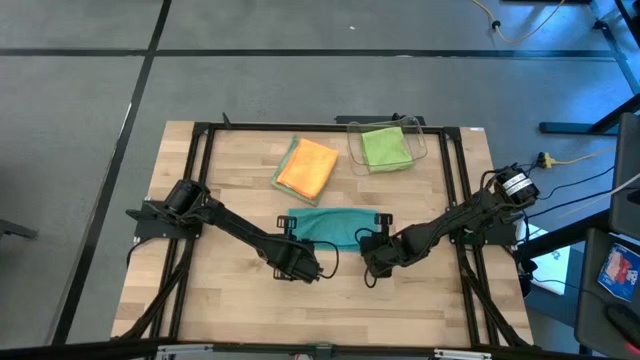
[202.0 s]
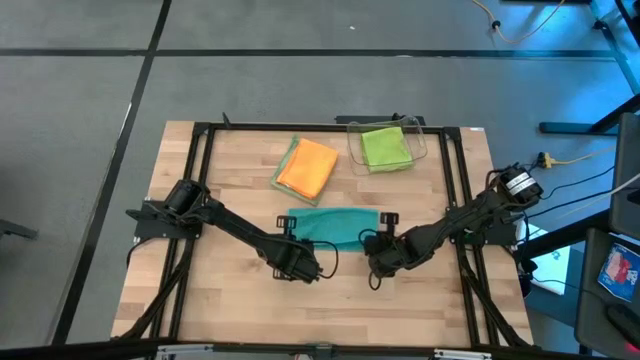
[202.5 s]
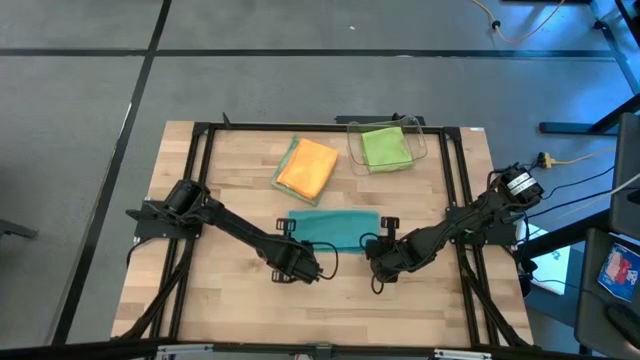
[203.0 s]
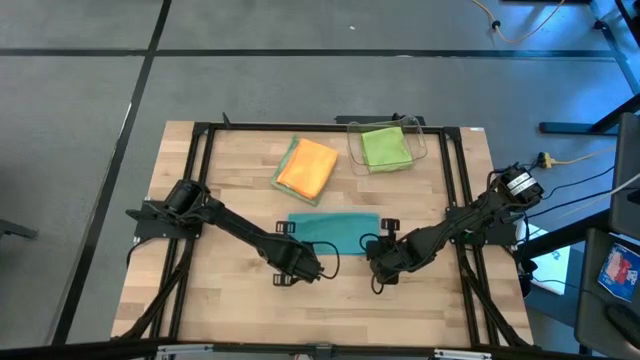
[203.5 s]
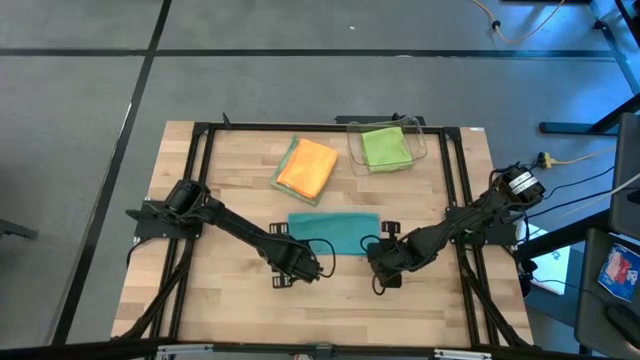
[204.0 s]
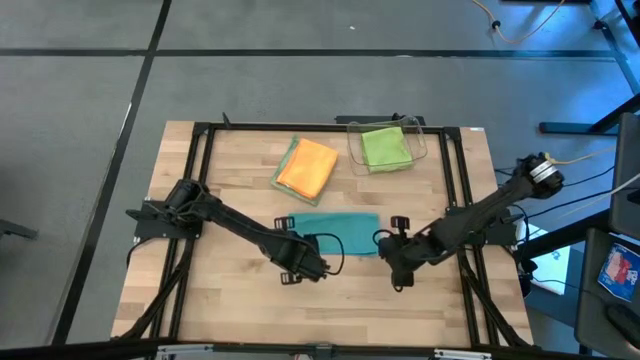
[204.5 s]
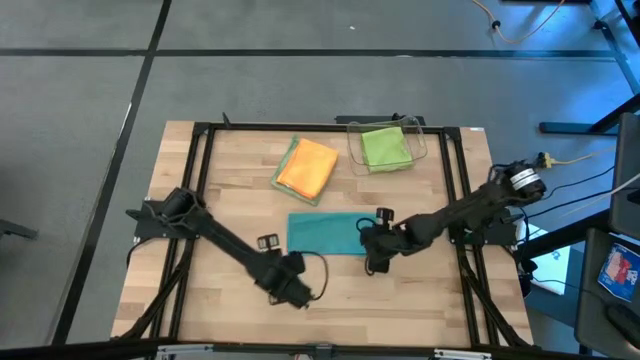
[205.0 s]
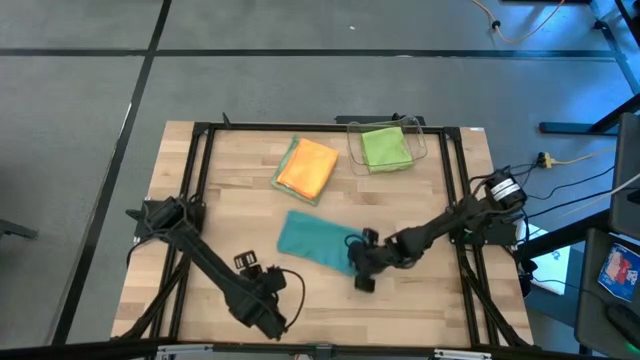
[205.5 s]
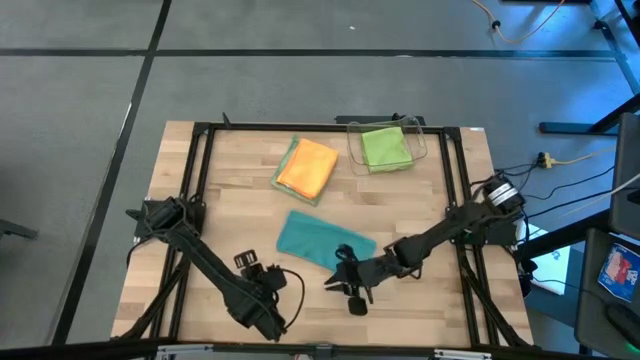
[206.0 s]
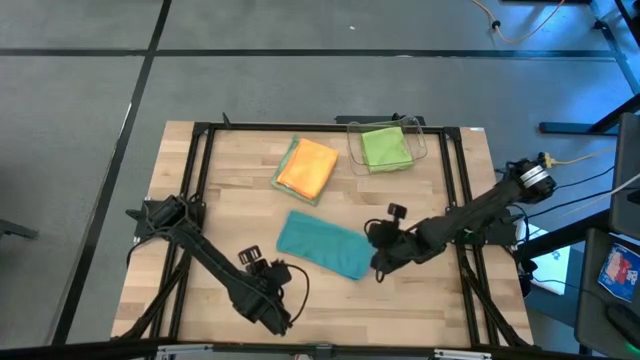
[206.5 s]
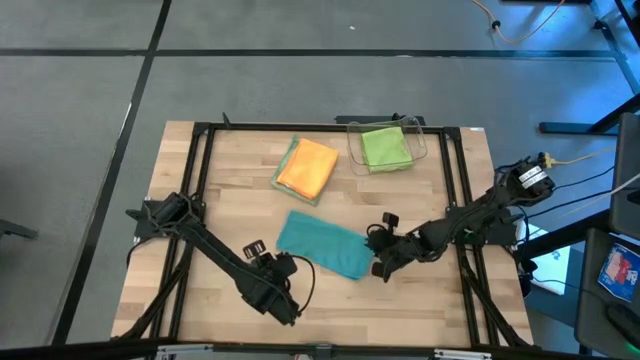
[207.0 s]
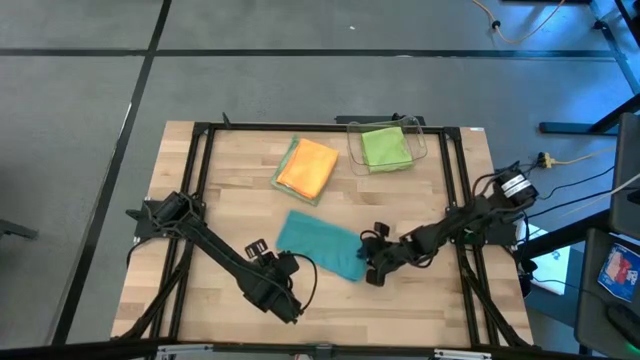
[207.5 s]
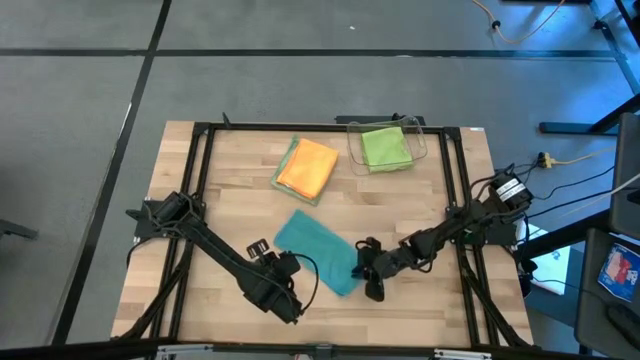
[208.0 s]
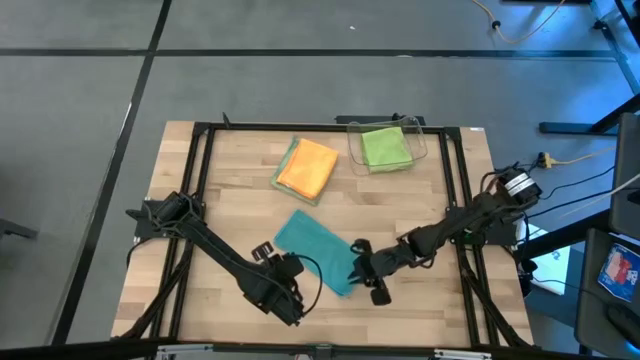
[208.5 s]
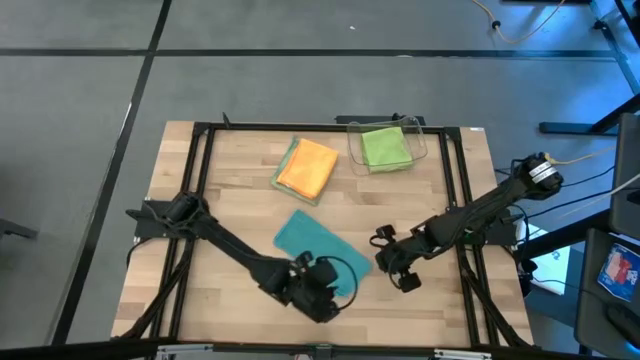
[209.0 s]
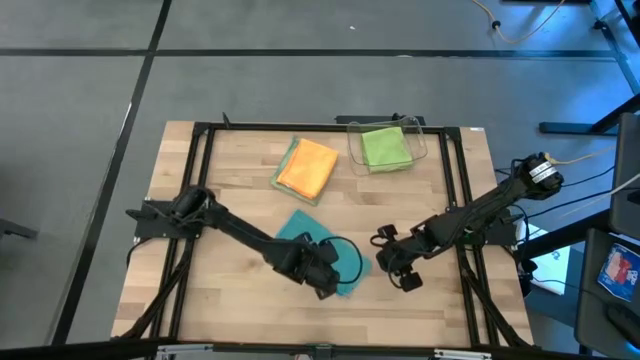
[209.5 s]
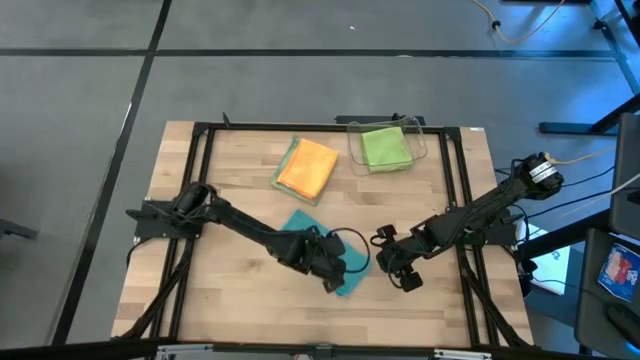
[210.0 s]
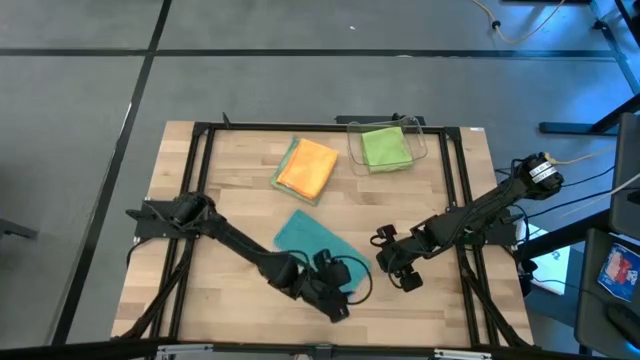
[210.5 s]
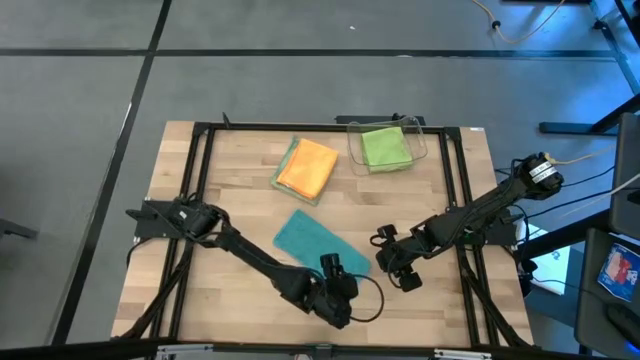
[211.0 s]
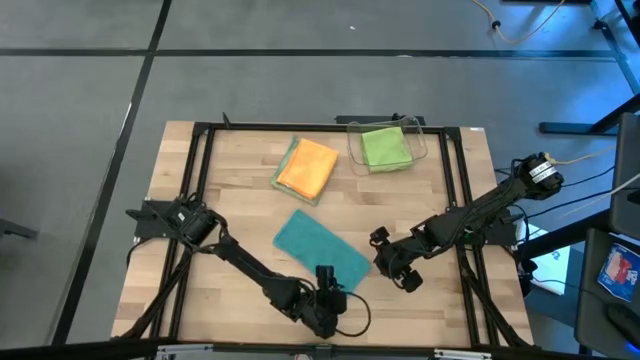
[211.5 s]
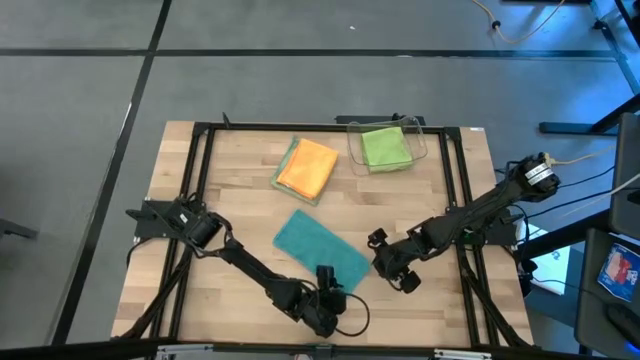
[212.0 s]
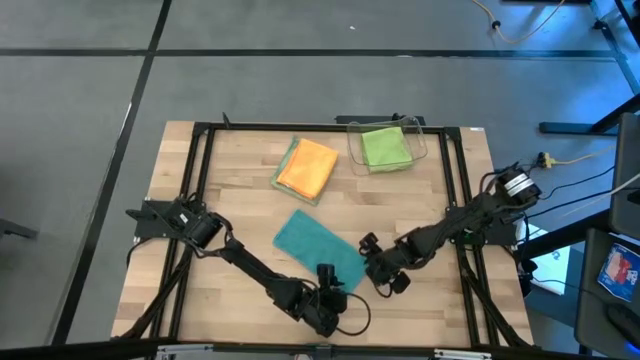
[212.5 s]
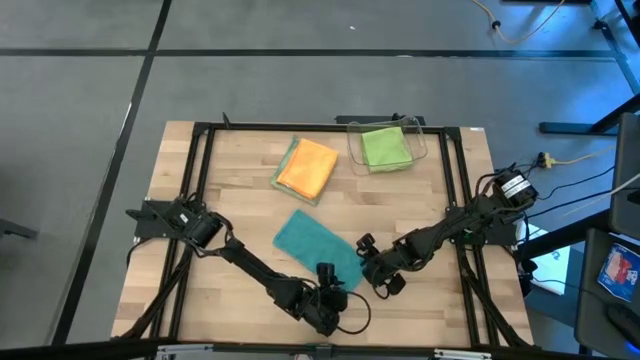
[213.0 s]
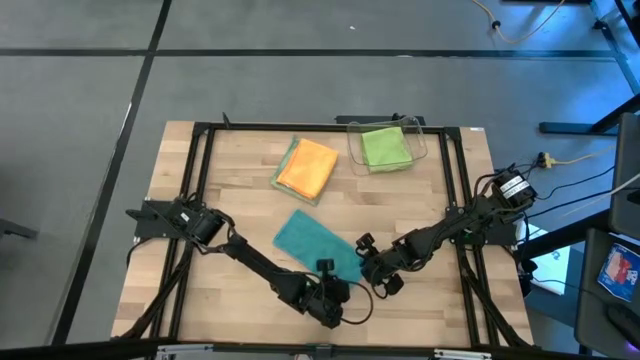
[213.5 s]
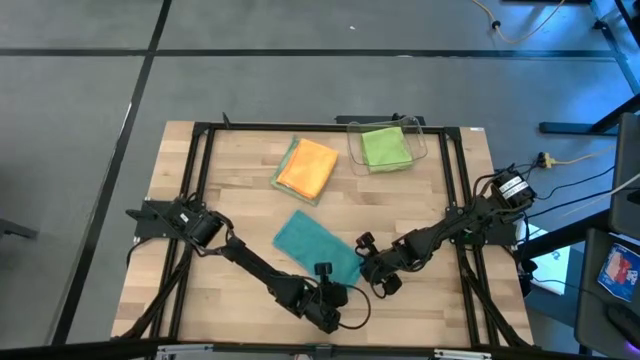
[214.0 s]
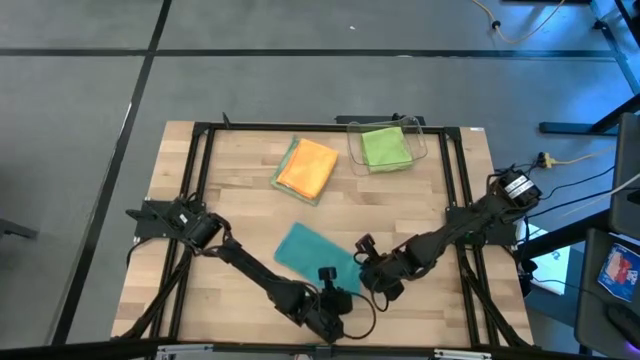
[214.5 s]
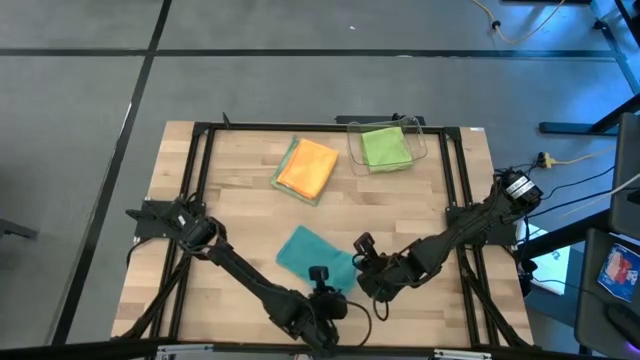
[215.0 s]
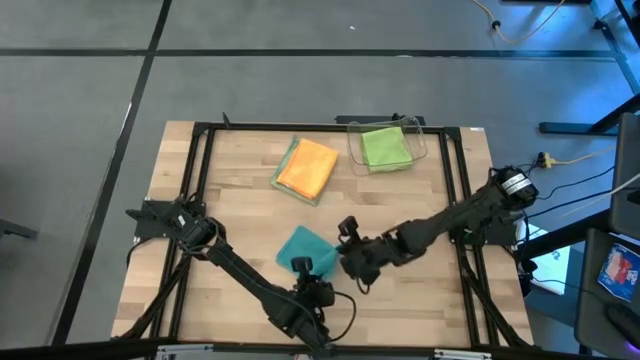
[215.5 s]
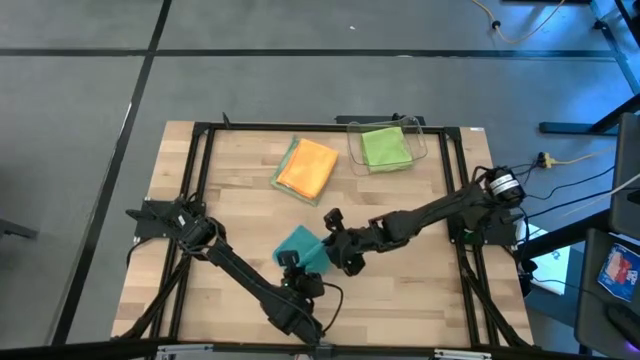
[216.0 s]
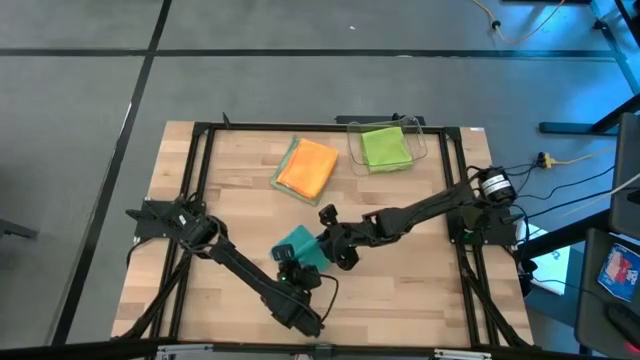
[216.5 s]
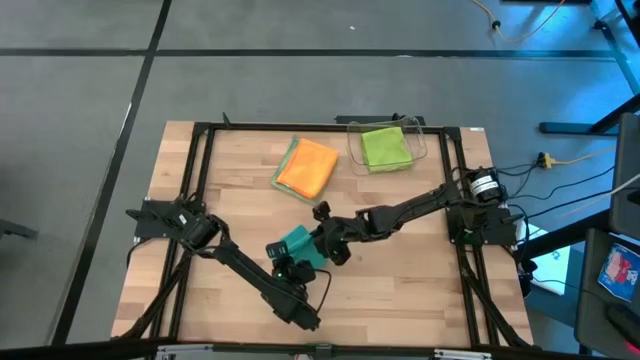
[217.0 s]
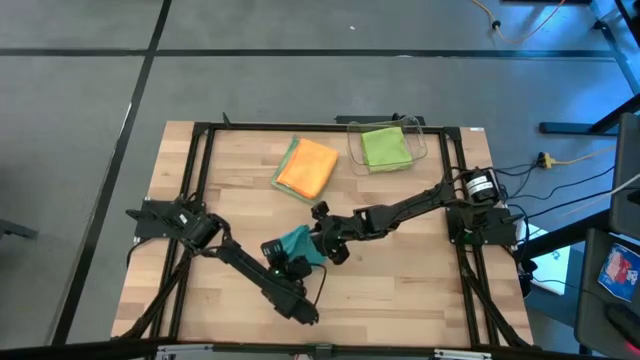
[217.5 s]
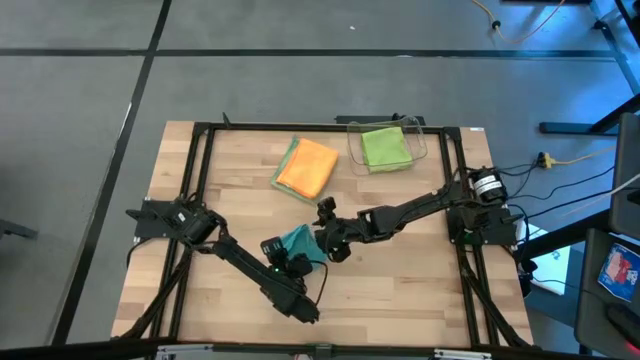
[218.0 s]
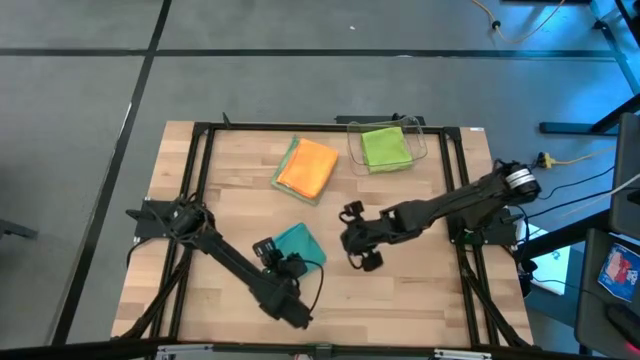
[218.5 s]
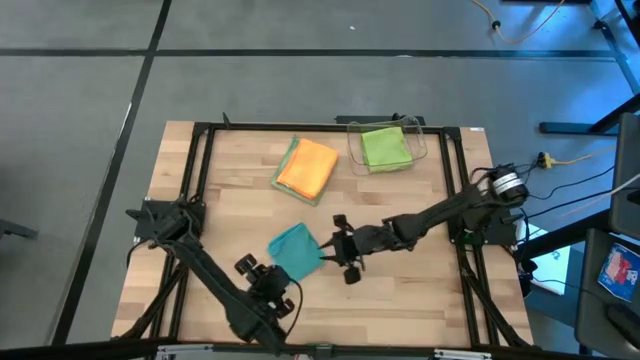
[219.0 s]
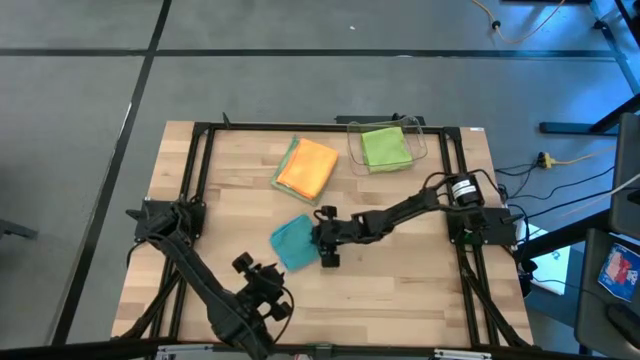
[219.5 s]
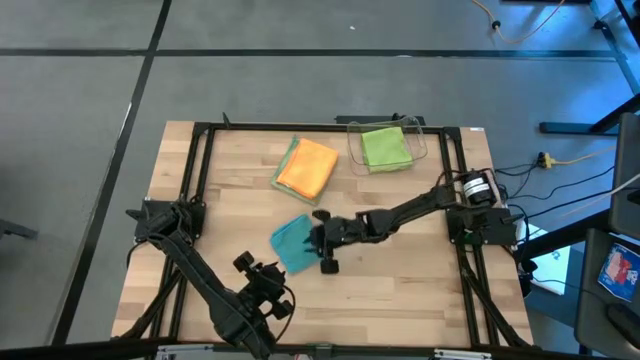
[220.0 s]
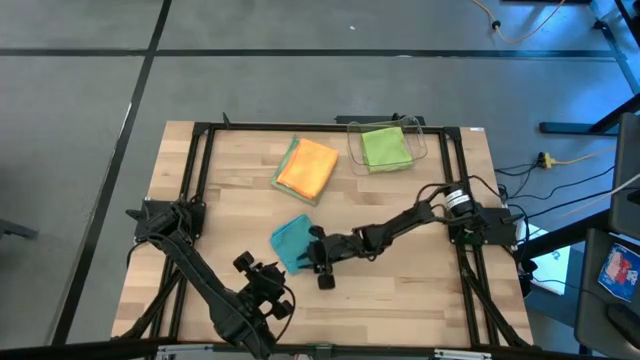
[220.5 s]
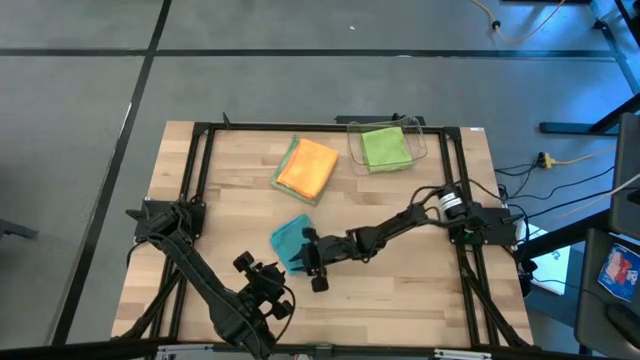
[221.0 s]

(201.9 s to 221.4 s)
Task: Fold microfiber towels
Fold the blue microfiber towel
